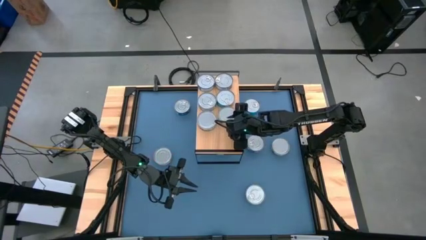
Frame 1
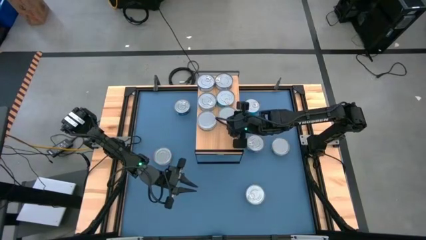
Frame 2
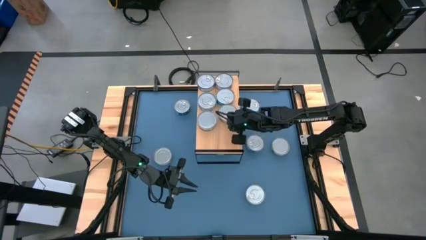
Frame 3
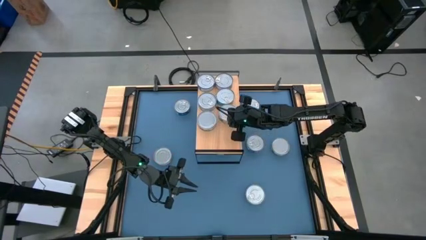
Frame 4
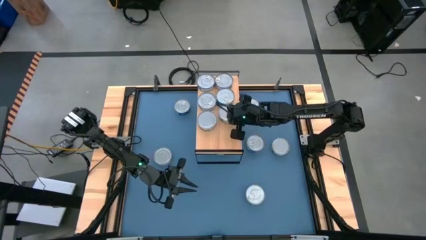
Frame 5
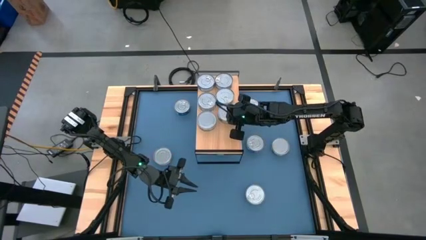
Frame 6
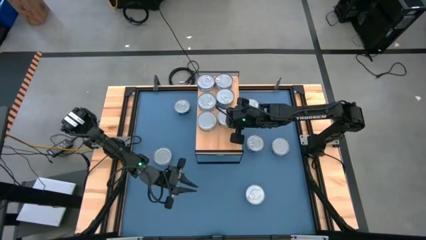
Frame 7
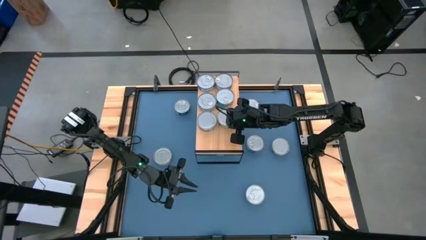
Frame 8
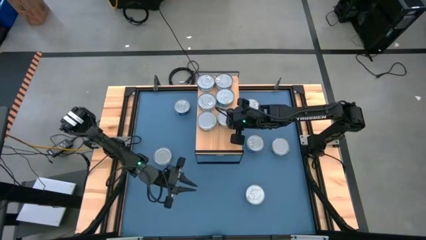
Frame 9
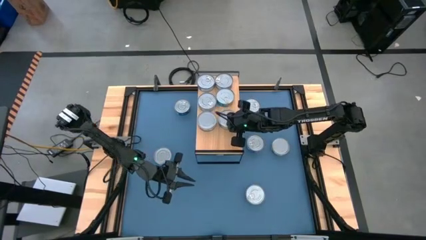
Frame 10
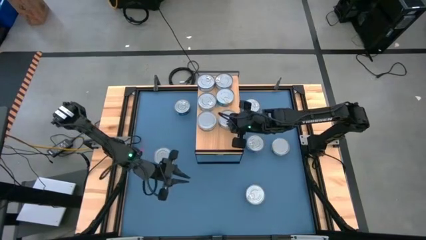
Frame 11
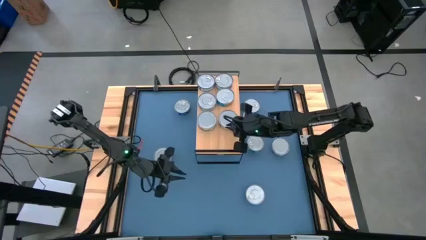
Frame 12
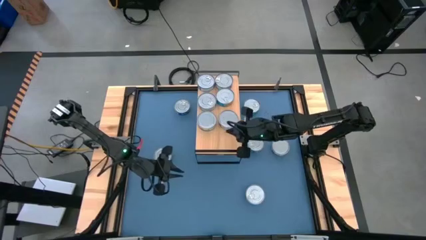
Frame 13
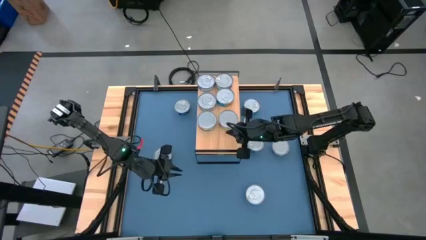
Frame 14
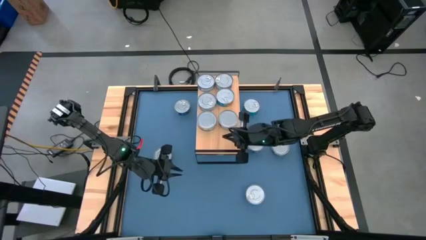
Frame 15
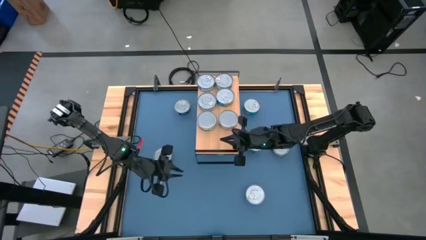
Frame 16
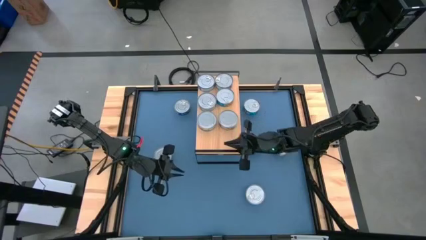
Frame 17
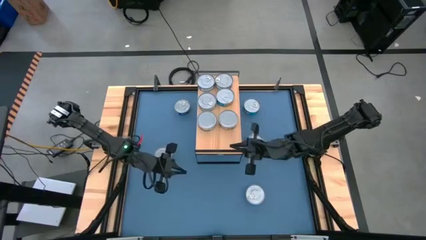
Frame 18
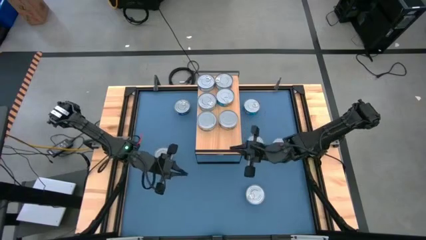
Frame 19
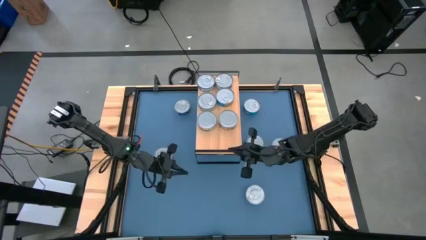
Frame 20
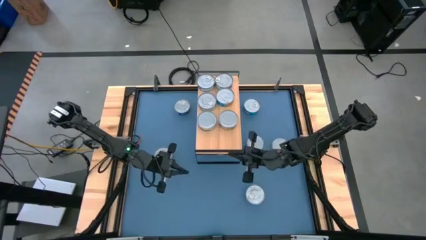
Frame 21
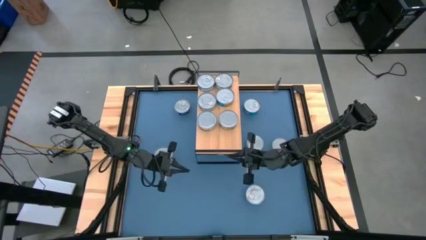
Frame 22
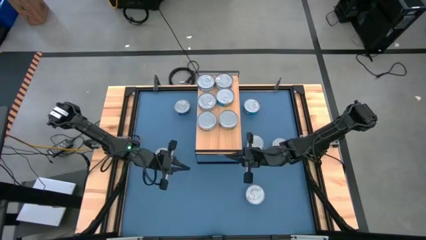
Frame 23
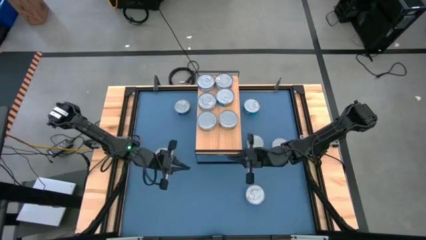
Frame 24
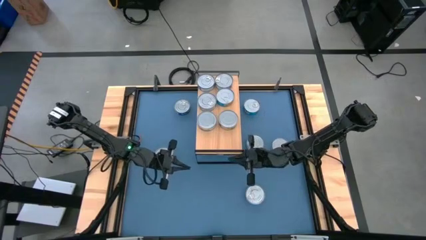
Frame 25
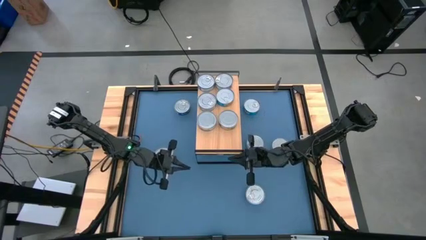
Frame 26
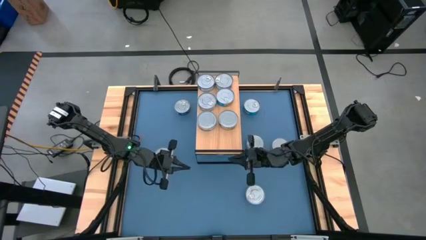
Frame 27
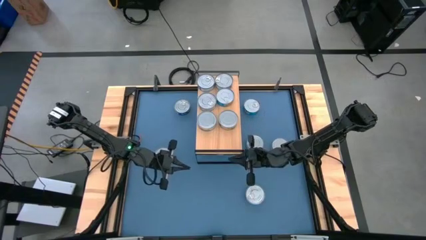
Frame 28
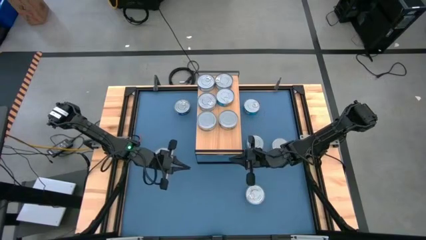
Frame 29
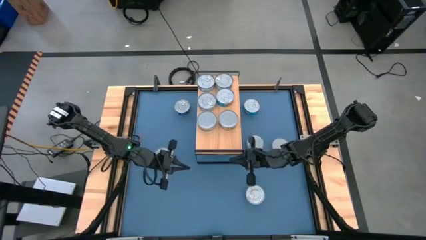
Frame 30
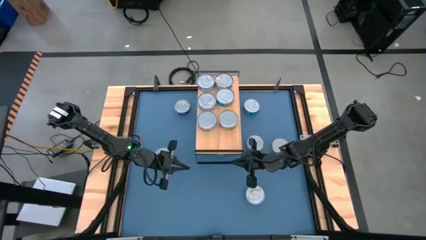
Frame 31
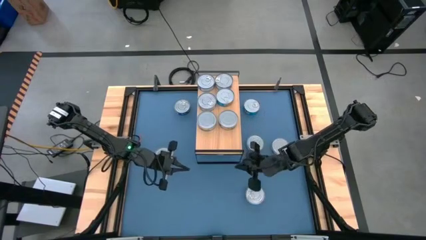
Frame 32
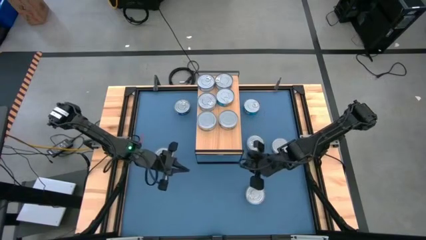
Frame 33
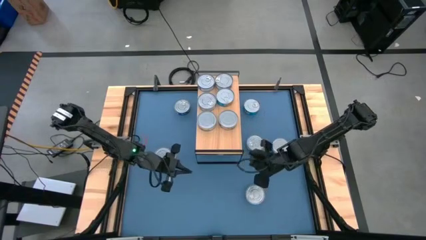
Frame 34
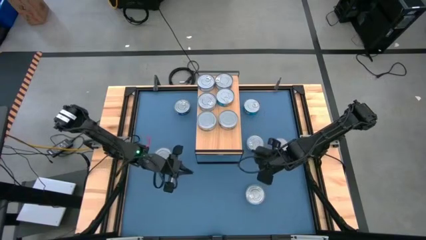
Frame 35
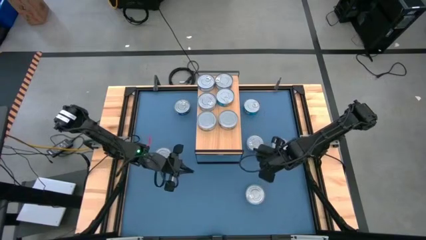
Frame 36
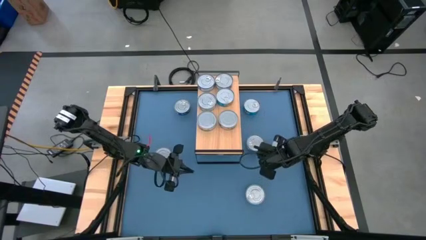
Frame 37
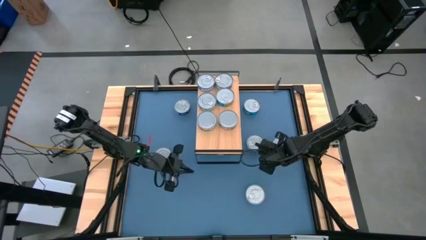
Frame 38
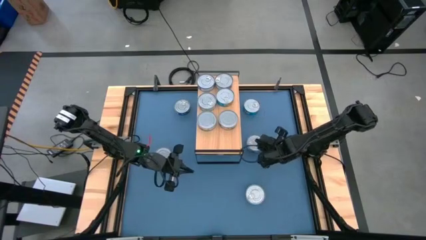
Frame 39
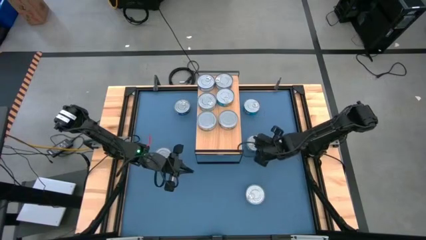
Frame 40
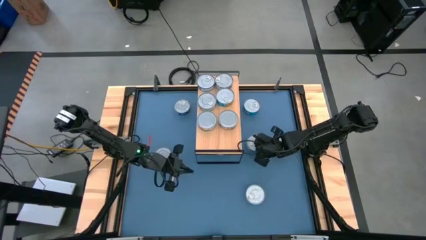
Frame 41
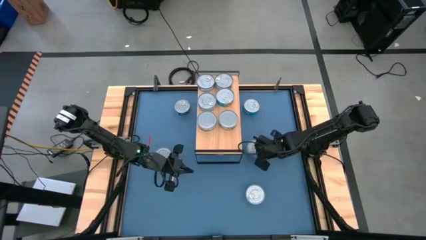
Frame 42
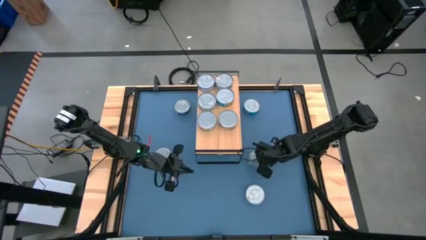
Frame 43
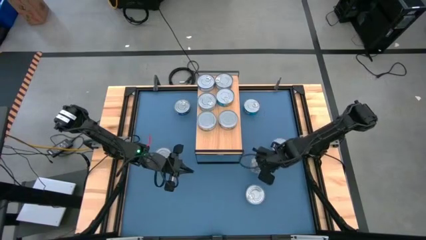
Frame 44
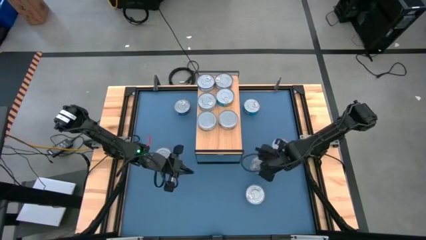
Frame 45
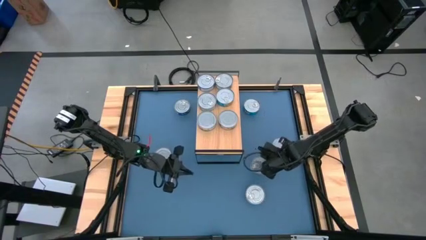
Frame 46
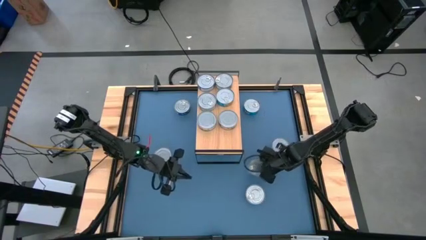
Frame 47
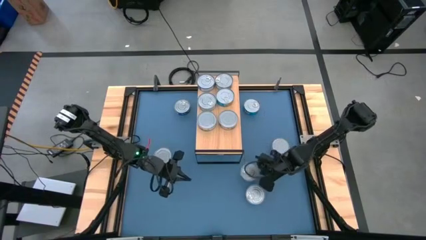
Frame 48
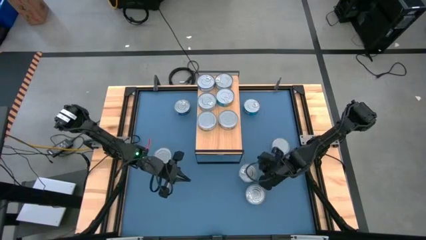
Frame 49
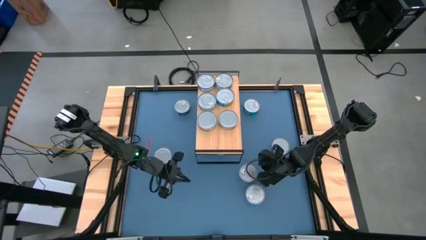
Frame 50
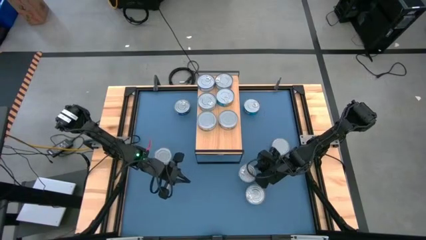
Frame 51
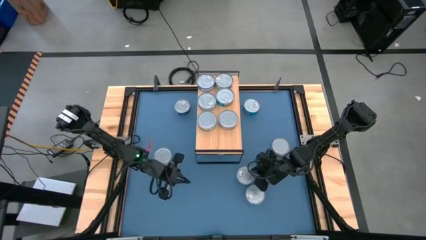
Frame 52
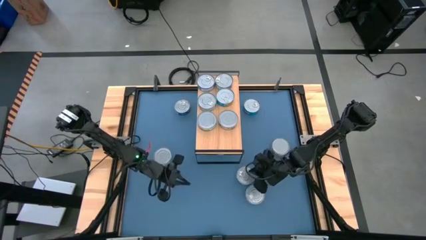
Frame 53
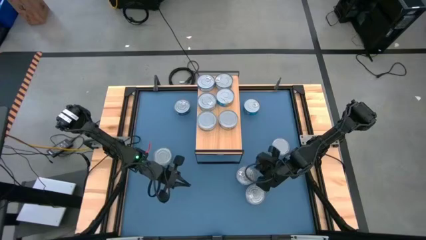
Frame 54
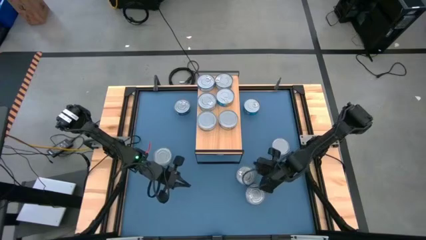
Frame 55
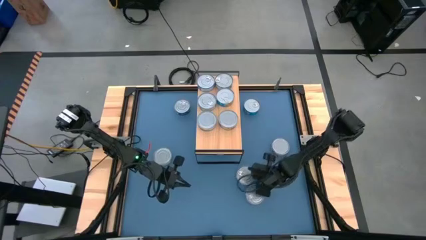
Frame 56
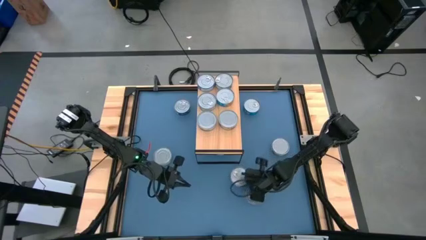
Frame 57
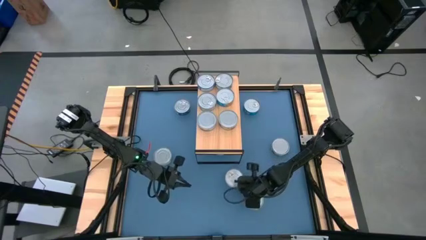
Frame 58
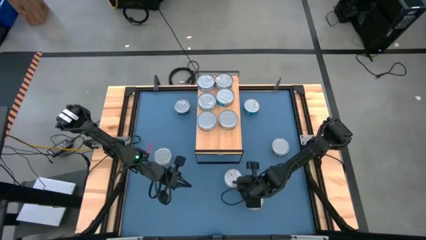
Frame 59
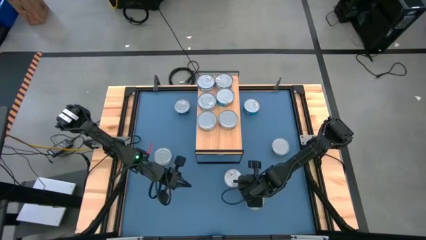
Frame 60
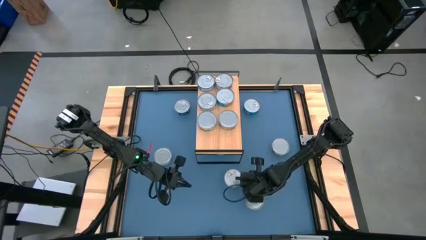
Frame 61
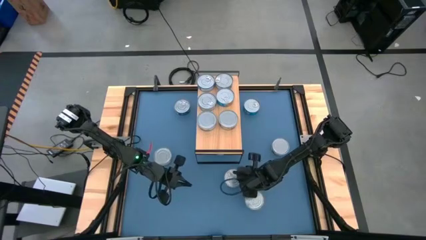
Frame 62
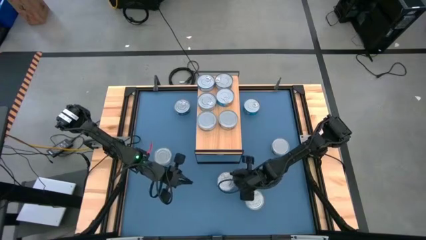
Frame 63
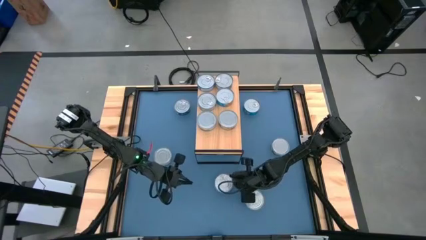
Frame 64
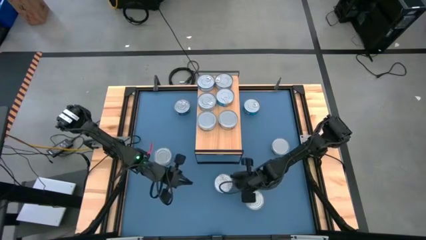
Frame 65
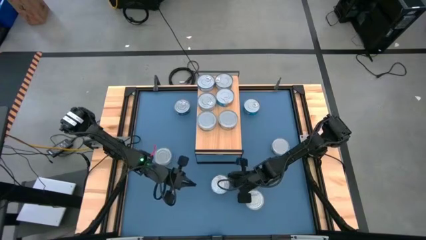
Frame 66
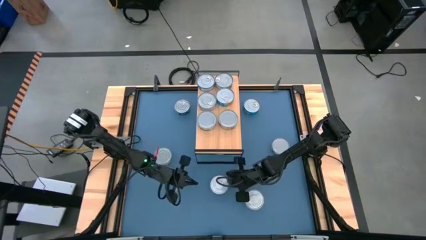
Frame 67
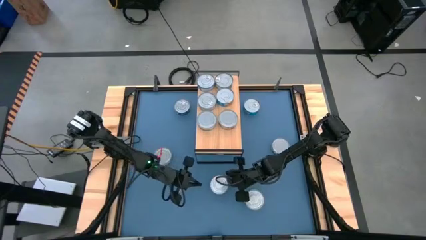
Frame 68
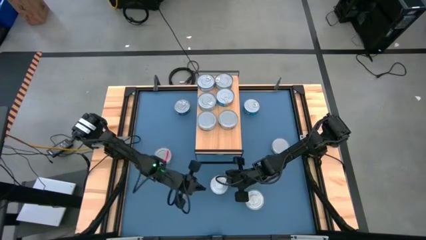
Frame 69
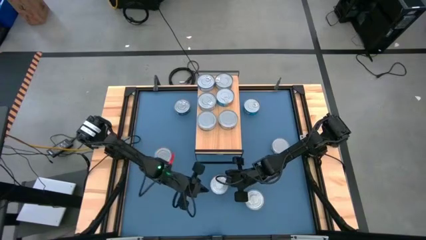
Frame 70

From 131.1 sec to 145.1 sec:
Task: Stack canned seafood by type on shelf
Stack the blue tuna can on top of the other blue tuna can on the shelf

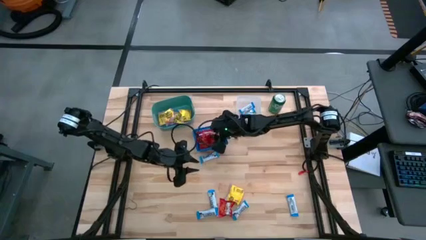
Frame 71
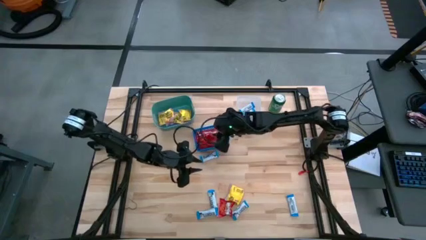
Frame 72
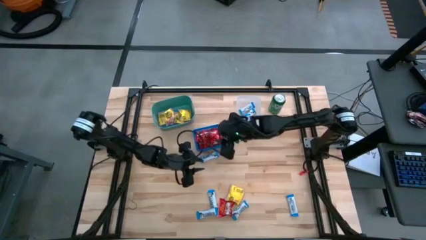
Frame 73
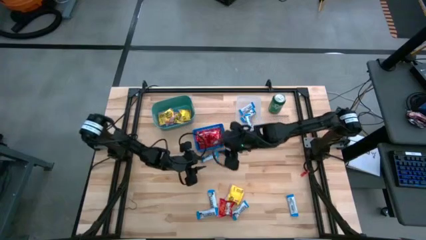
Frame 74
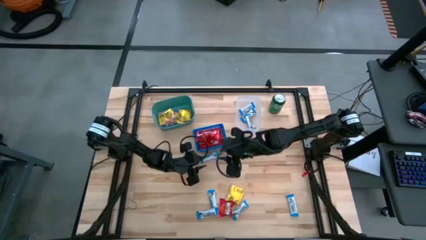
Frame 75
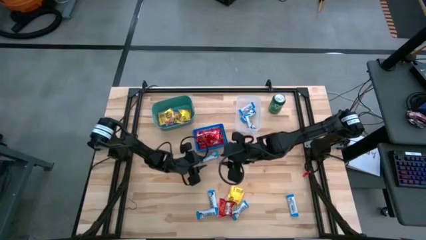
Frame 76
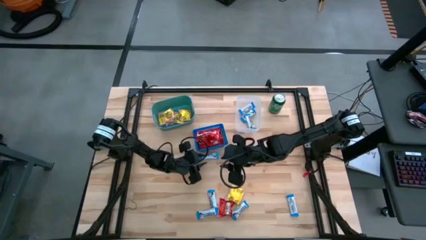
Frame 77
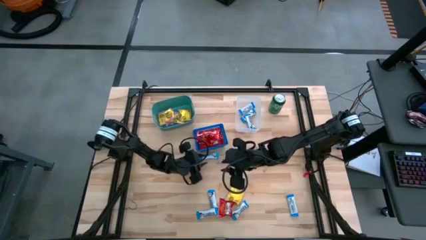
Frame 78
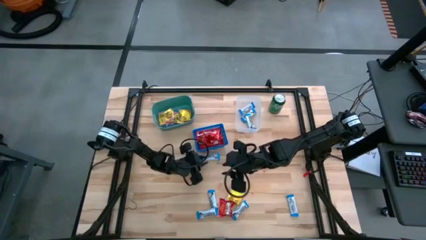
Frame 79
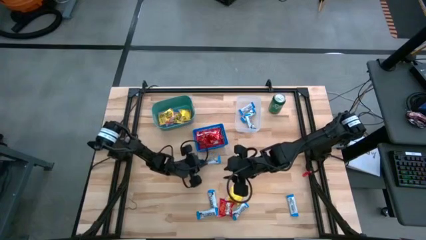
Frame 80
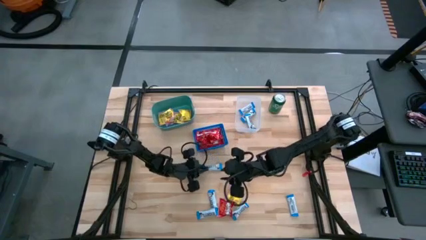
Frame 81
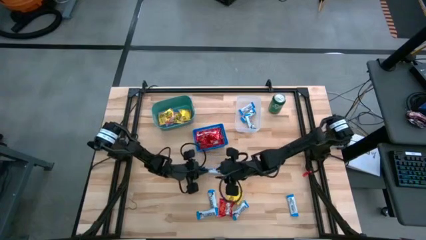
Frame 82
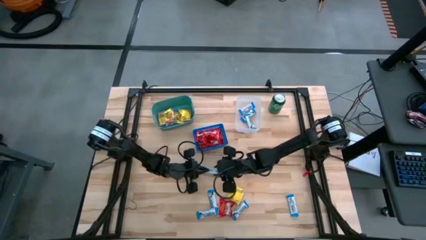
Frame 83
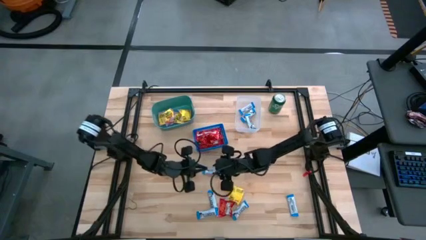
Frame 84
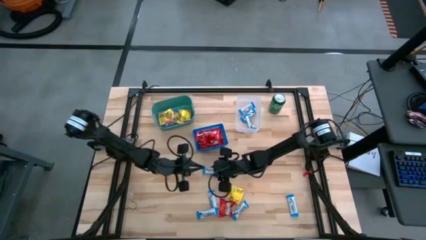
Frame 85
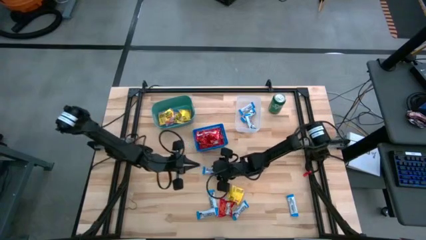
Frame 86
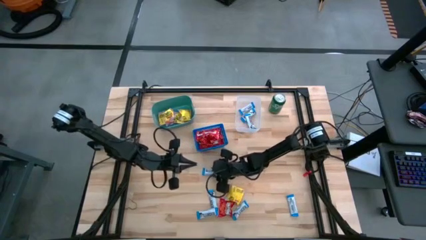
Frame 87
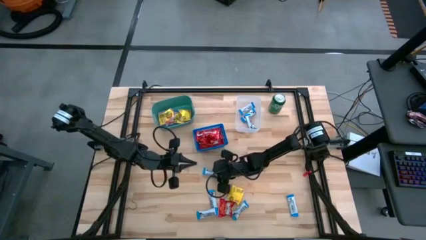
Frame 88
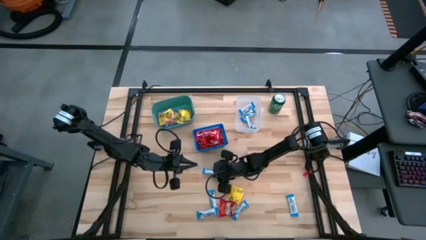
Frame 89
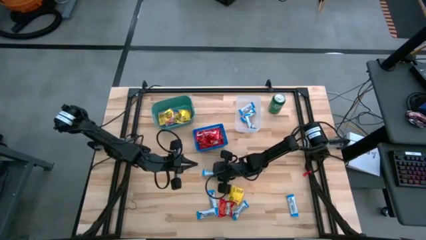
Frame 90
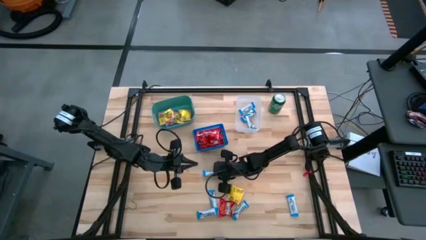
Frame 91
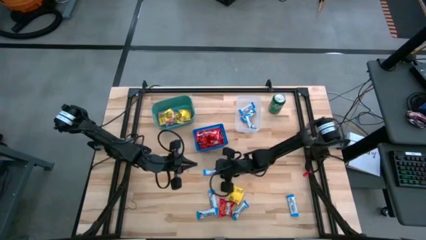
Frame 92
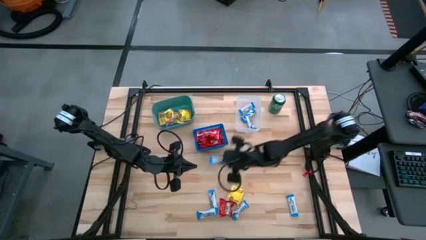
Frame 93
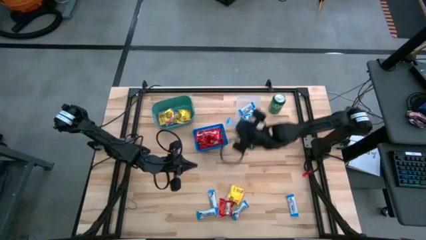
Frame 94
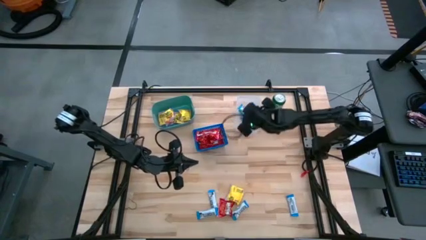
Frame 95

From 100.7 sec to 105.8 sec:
Task: Sort candy
Put the hersheys bar into the transparent bin
